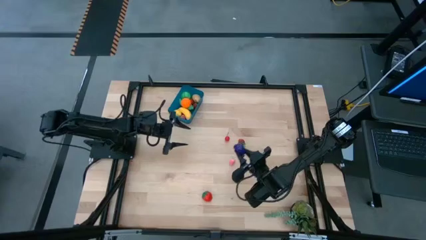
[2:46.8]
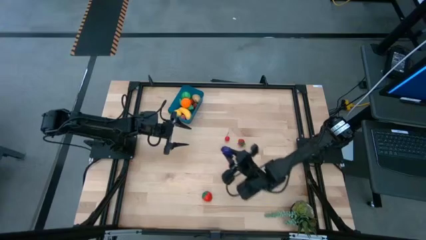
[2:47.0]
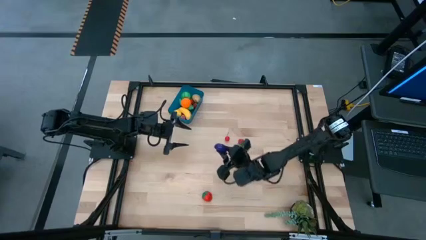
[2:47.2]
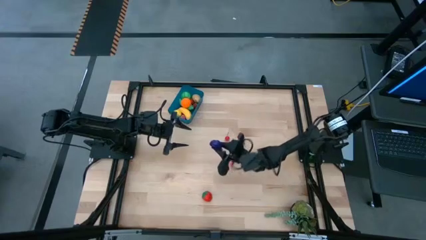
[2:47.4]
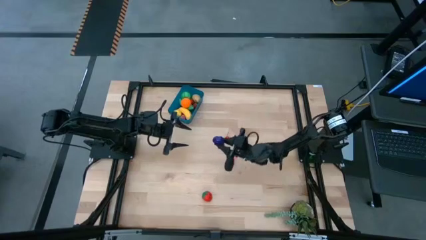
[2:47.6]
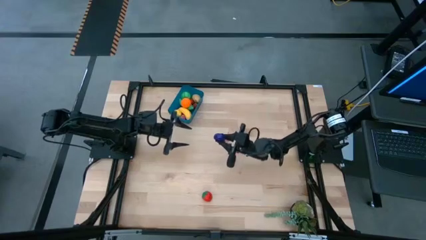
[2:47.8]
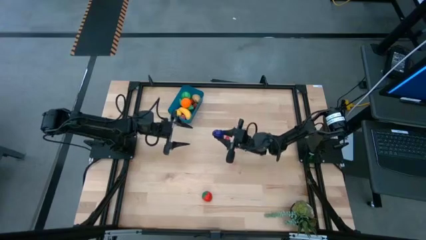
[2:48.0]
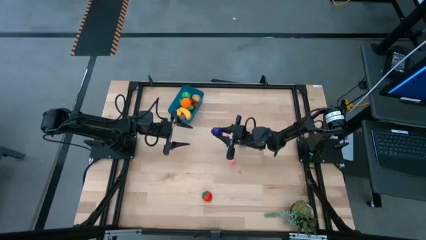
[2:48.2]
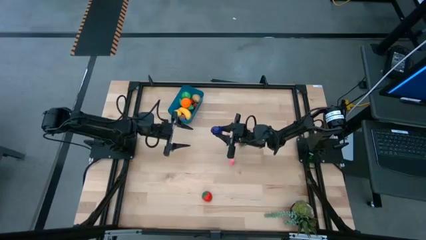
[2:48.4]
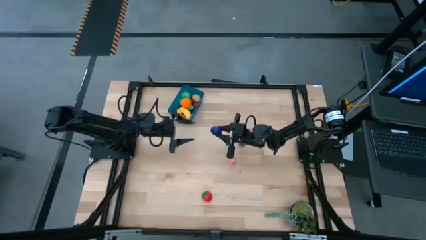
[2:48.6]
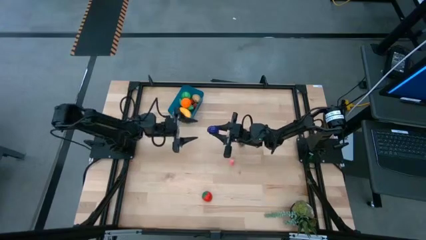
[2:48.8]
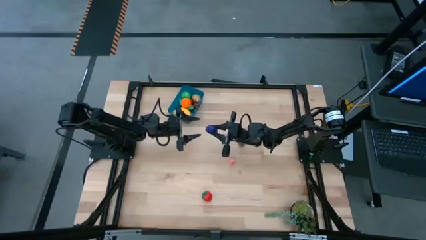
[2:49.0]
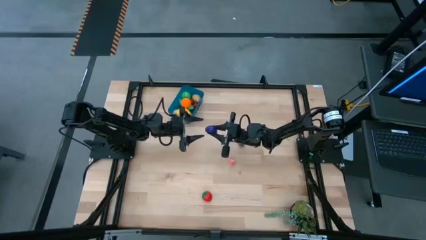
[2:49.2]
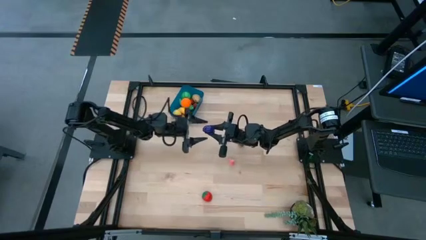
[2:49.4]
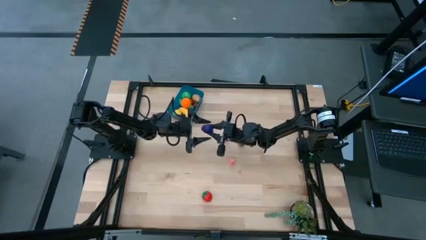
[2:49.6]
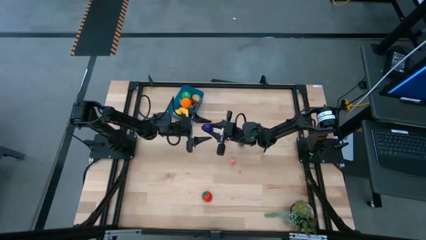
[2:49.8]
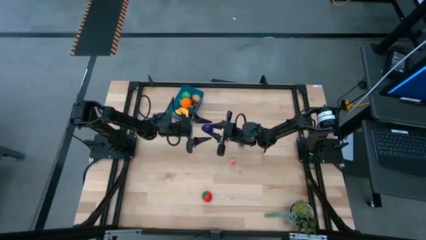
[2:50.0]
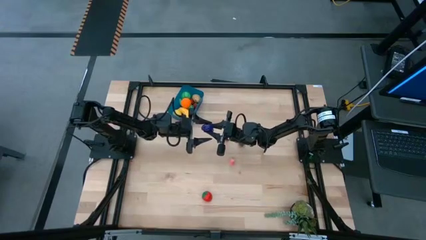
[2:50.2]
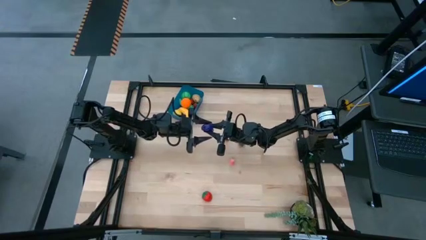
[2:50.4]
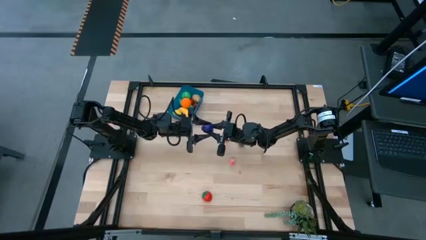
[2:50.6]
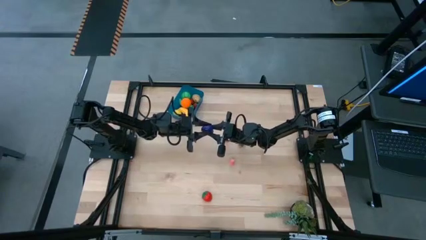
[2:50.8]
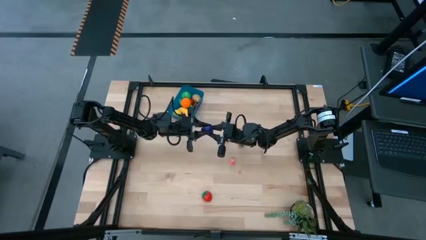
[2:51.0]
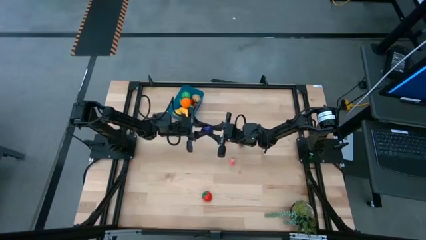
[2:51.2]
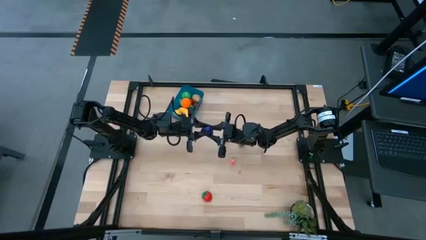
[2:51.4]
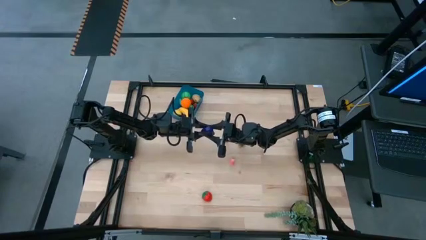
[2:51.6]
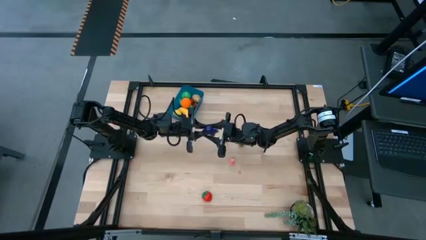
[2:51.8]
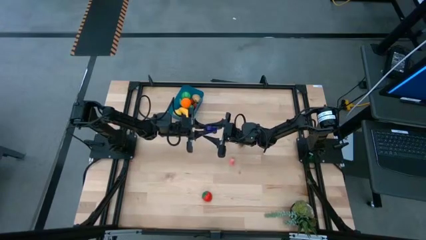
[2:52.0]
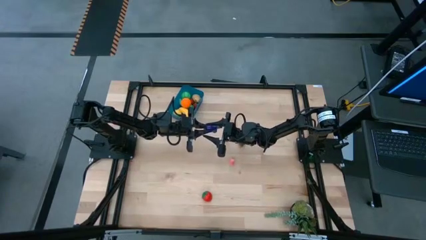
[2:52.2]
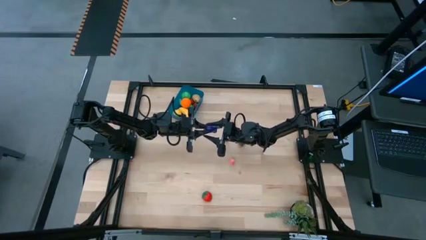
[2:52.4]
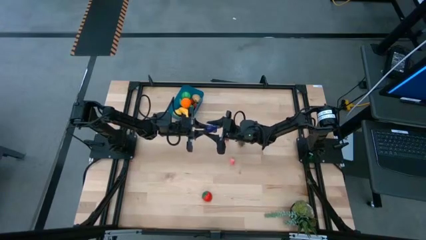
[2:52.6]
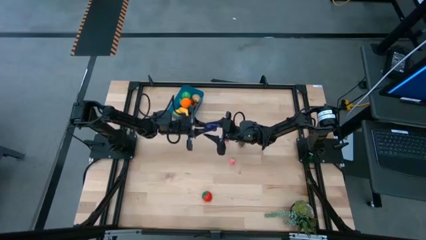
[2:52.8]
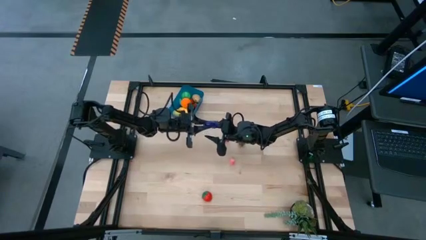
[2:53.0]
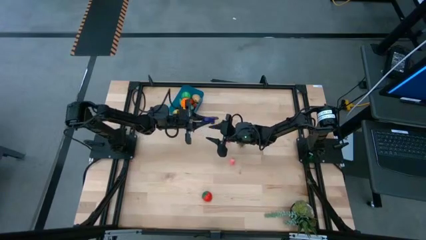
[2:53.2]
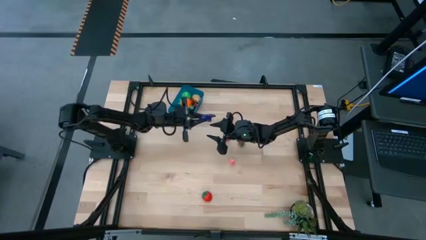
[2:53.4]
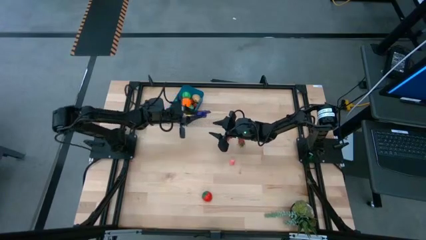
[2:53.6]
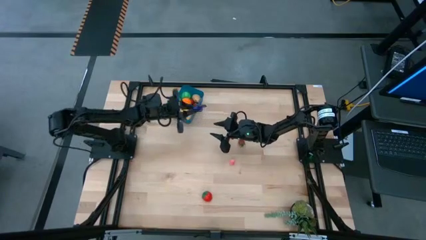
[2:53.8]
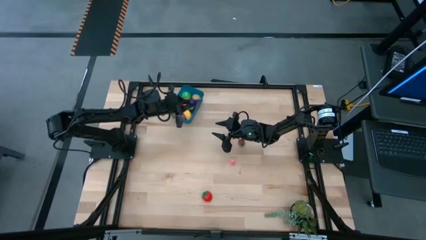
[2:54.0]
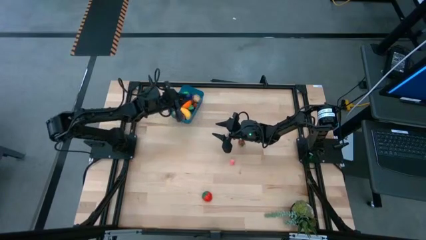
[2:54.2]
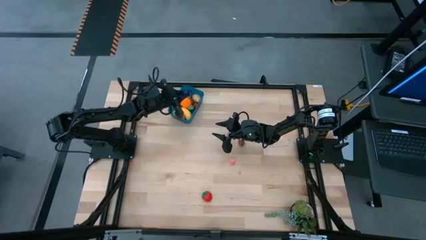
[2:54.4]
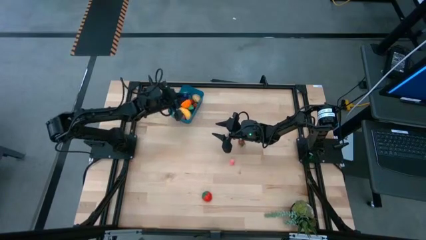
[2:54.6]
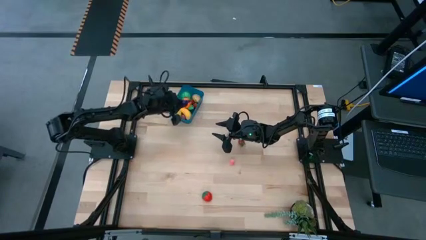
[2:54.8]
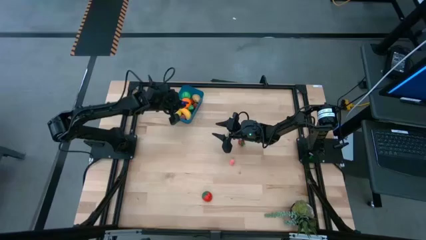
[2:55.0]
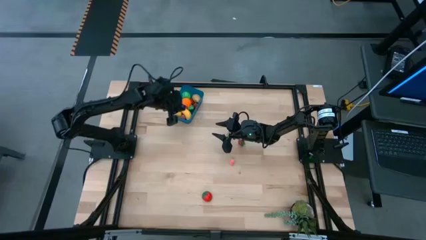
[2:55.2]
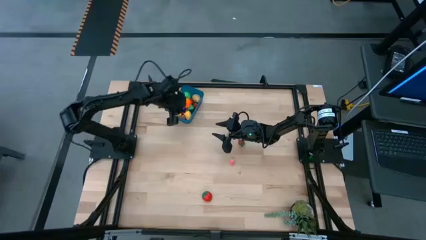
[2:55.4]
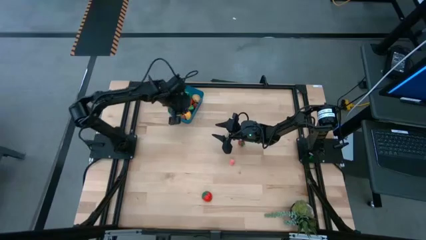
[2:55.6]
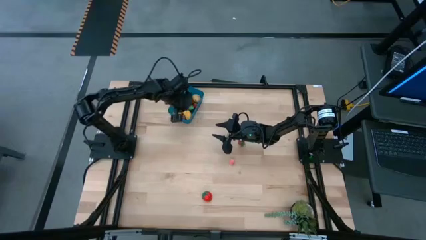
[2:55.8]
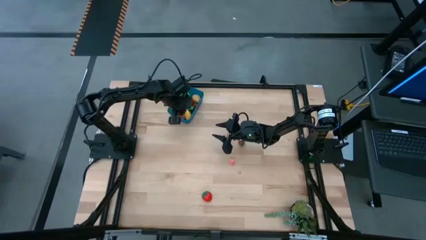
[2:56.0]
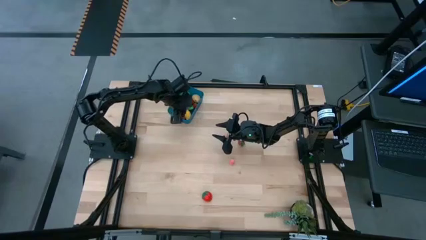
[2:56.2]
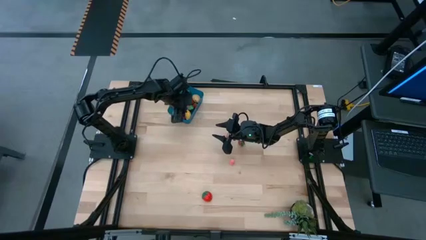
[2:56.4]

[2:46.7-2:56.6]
Task: Pick and placing Produce into tupperware
Put the violet eggplant into the blue bin

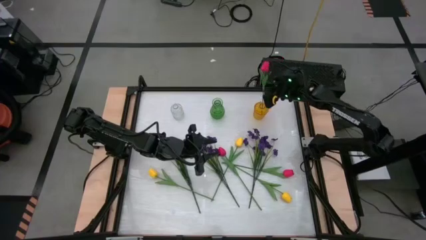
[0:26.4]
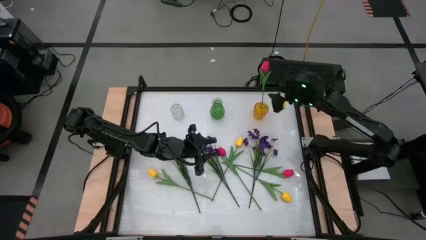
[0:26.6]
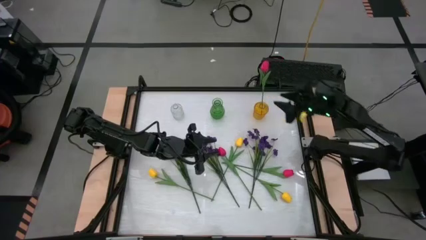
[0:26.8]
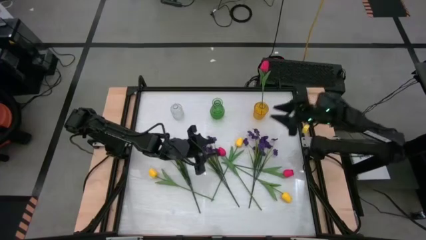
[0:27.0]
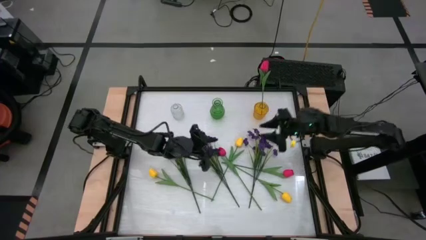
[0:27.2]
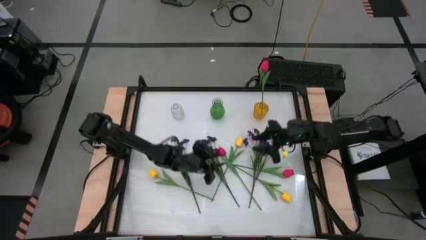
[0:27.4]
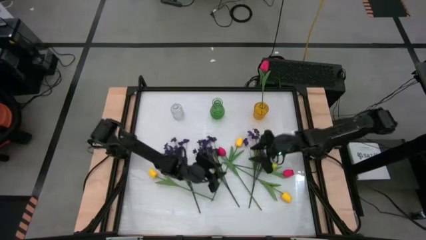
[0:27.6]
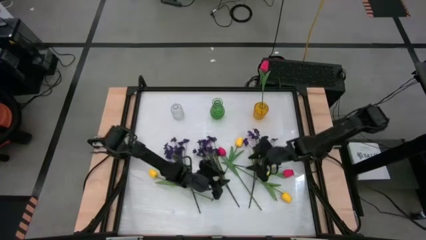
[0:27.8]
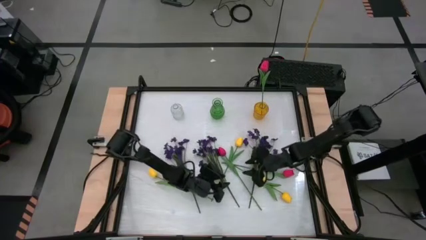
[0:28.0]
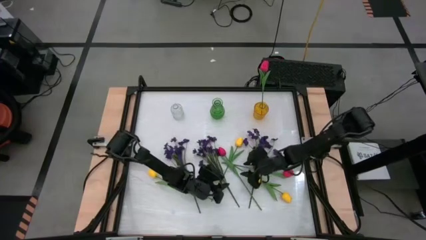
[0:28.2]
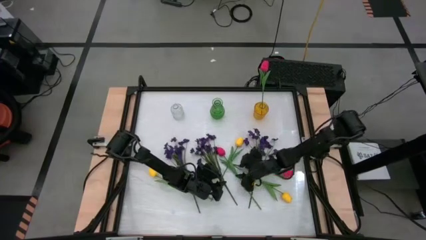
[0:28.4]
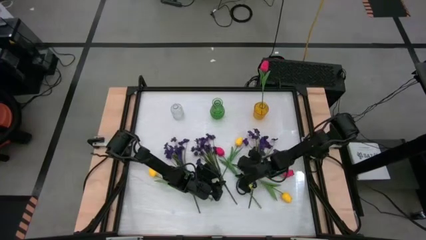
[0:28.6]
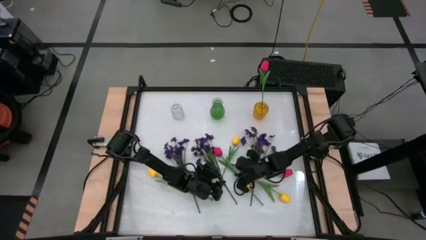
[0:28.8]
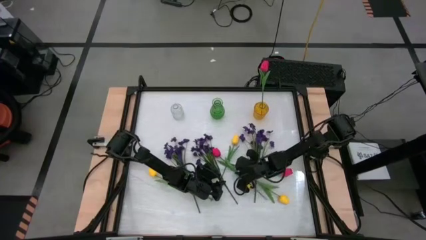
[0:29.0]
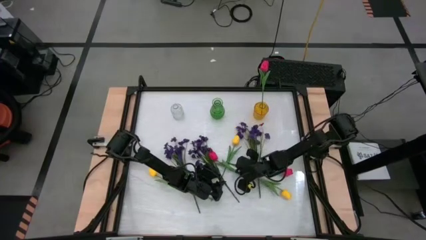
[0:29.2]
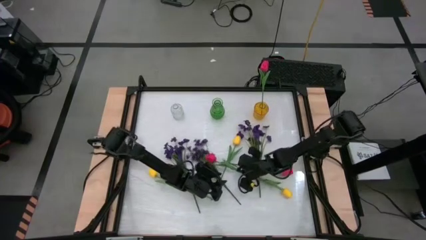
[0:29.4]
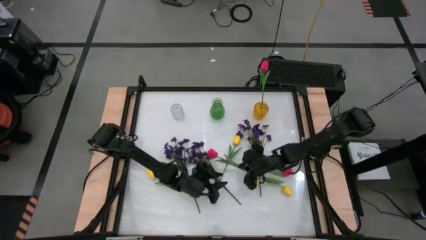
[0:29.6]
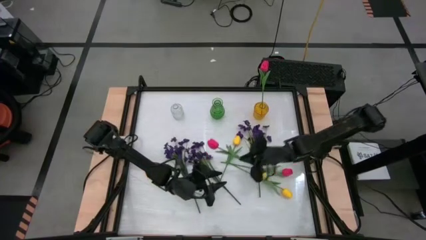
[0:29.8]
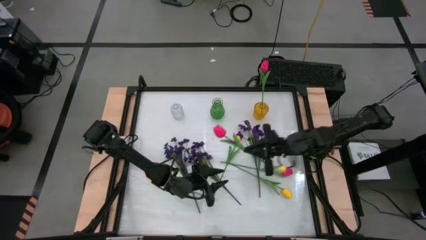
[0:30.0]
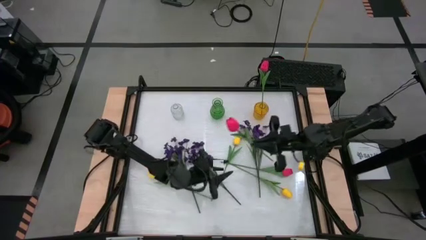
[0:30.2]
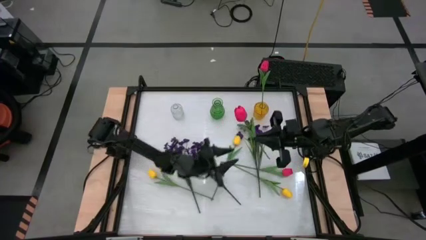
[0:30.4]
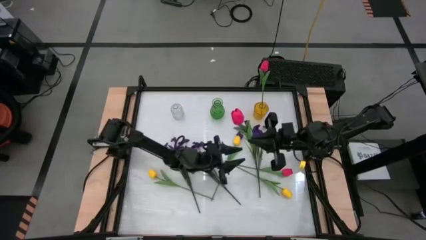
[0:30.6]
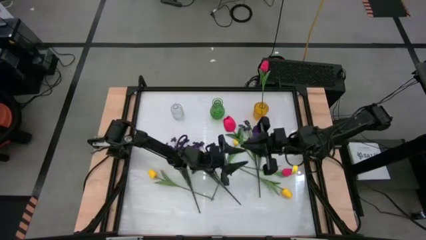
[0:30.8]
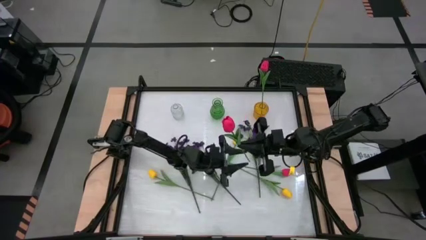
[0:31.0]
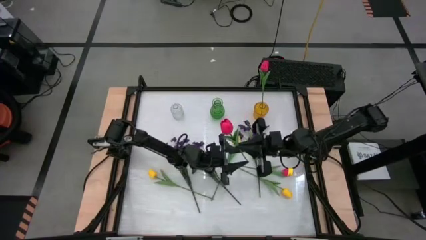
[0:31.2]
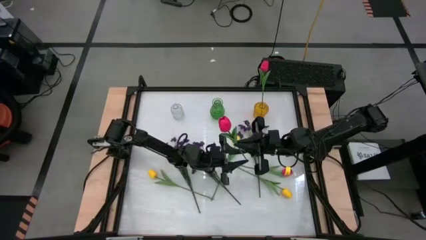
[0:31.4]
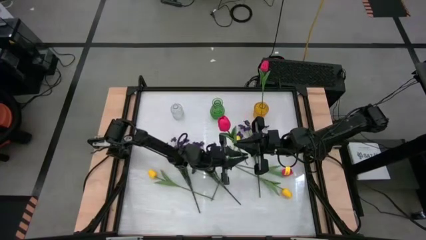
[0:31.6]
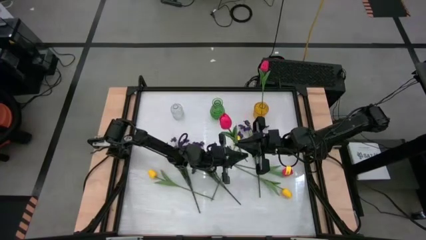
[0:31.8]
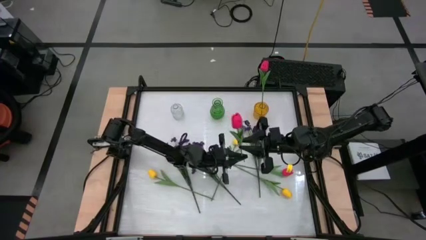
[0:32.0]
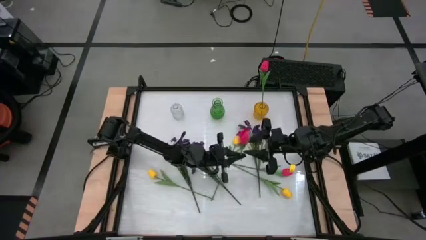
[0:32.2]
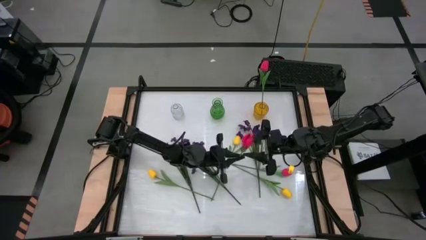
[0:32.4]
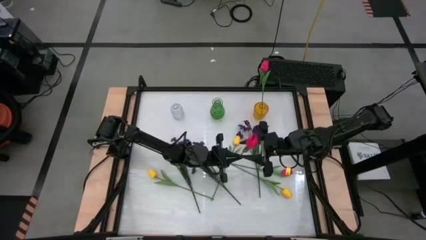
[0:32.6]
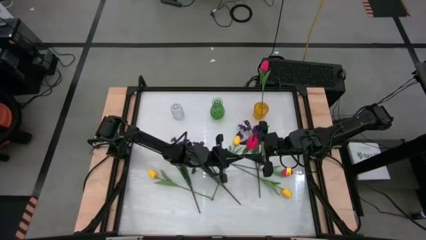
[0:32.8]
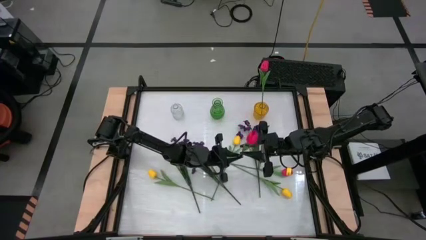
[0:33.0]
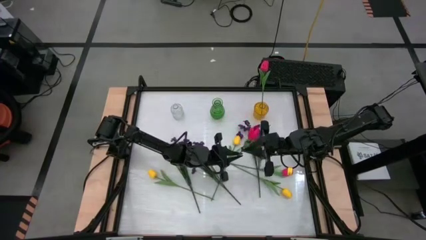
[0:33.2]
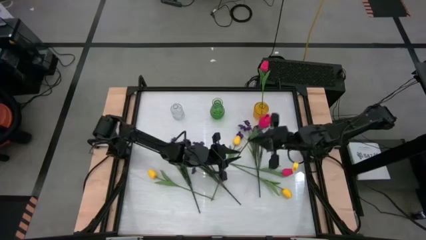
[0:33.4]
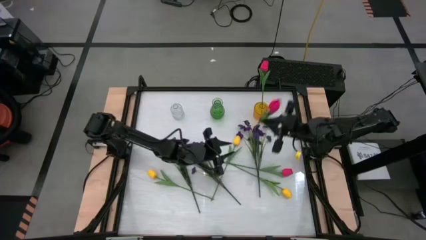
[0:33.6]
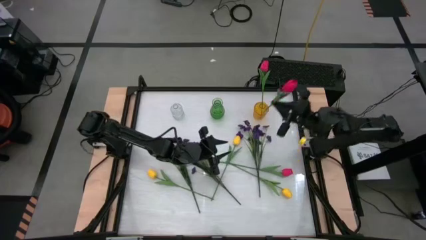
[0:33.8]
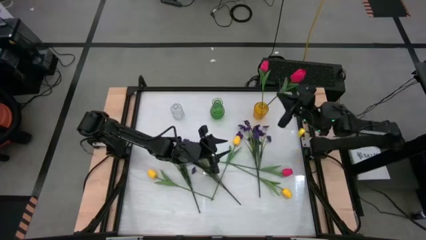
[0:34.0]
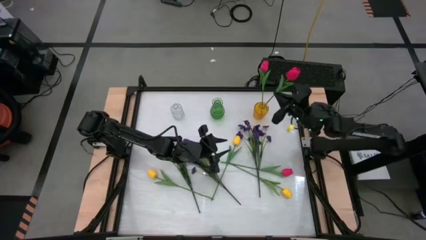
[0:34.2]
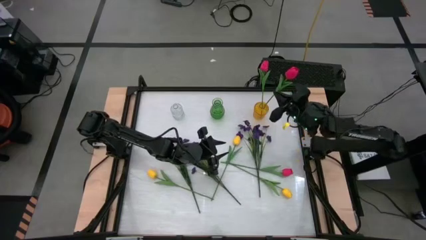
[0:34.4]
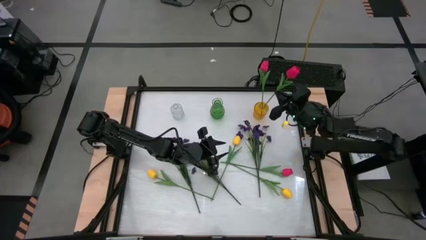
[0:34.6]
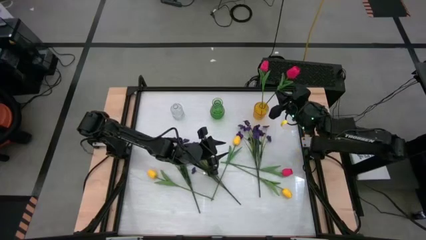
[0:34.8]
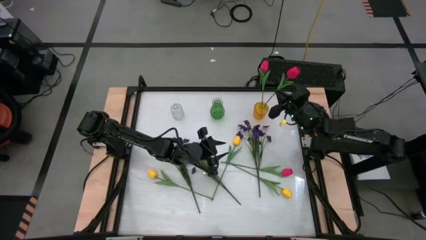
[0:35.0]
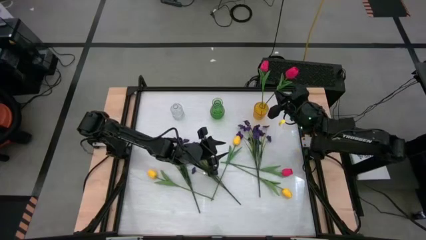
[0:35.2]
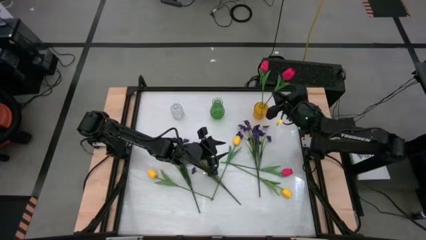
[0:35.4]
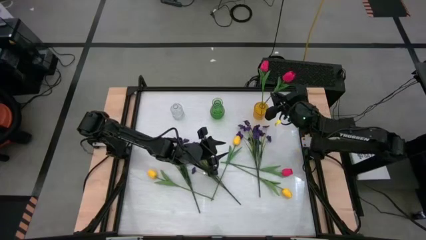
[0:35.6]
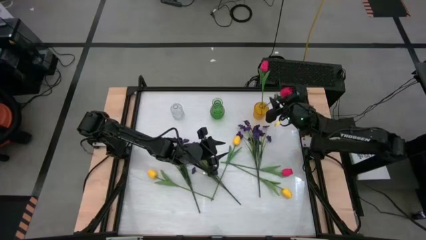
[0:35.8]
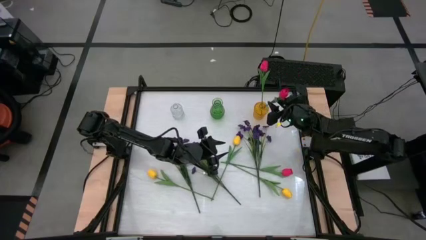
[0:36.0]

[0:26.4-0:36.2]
Task: Sort flowers into vase by color
Put the left pink flower into the yellow vase
